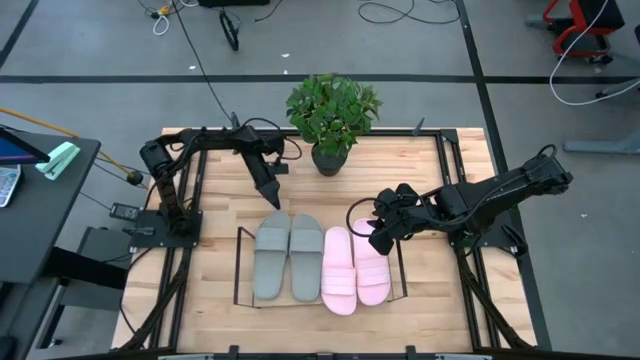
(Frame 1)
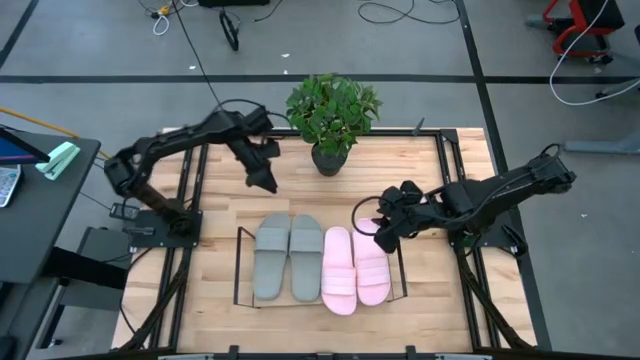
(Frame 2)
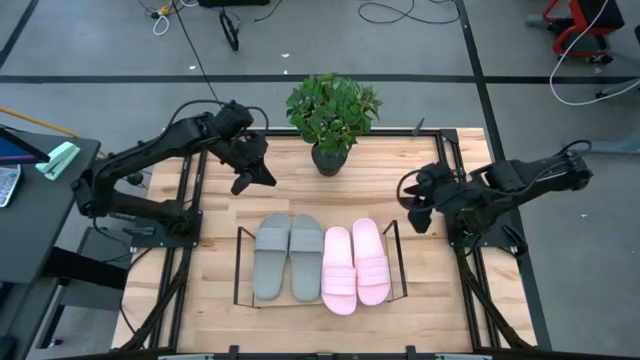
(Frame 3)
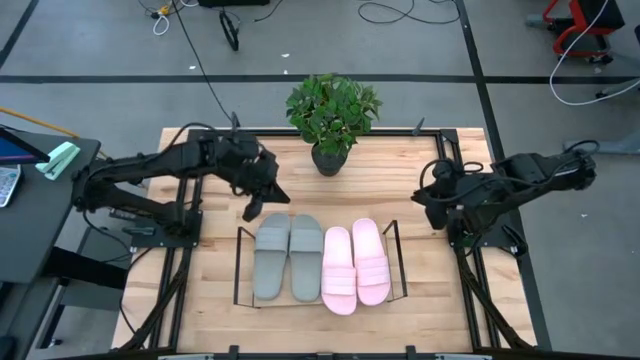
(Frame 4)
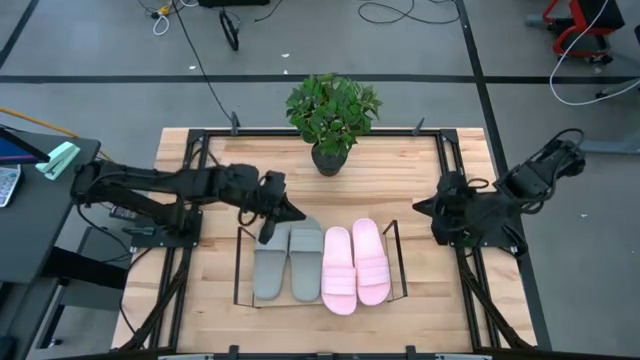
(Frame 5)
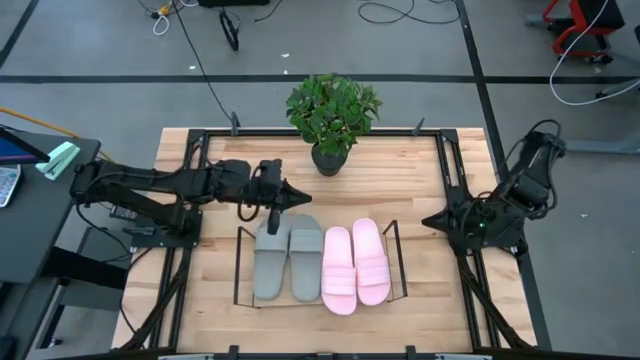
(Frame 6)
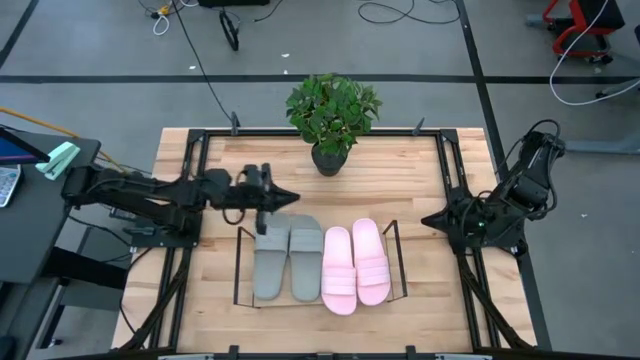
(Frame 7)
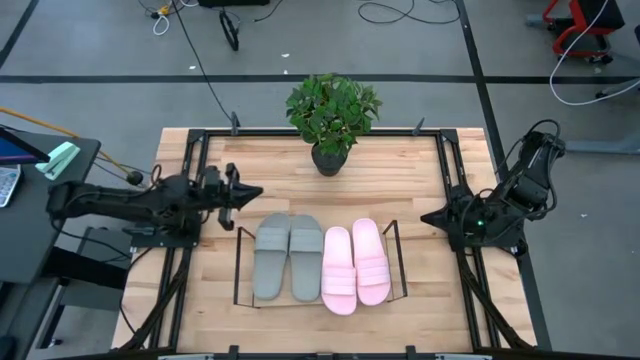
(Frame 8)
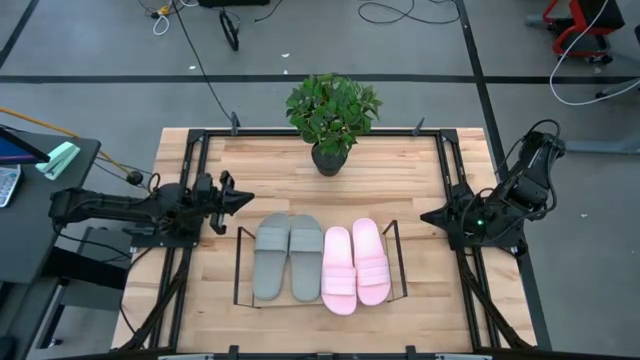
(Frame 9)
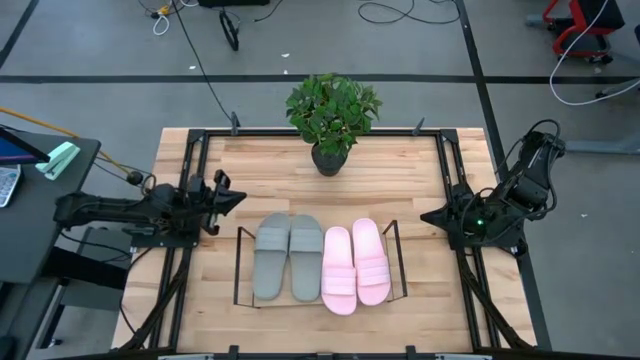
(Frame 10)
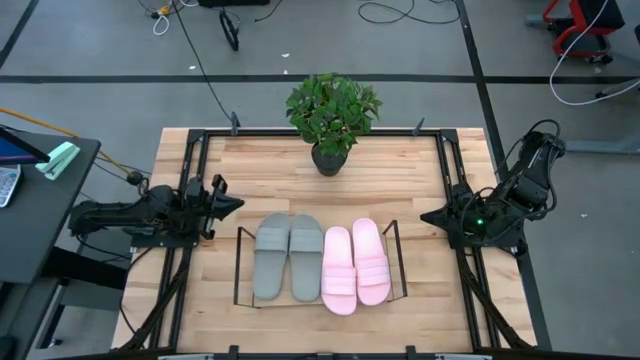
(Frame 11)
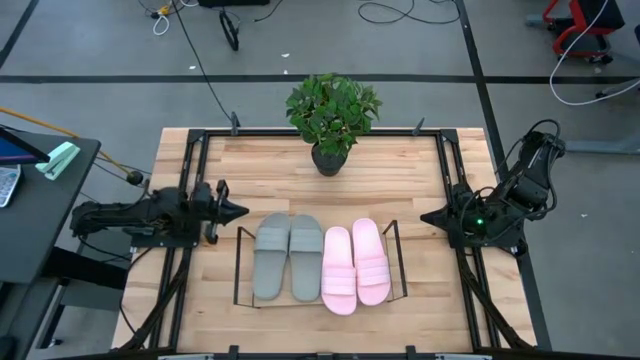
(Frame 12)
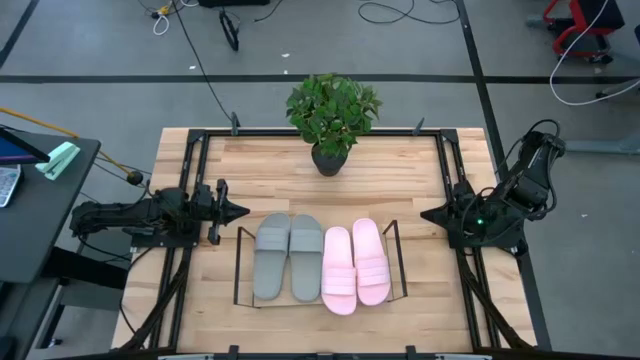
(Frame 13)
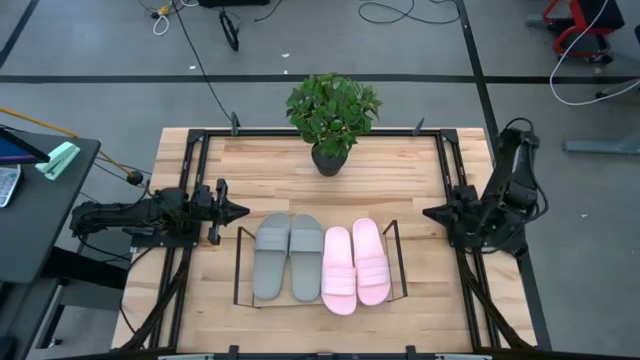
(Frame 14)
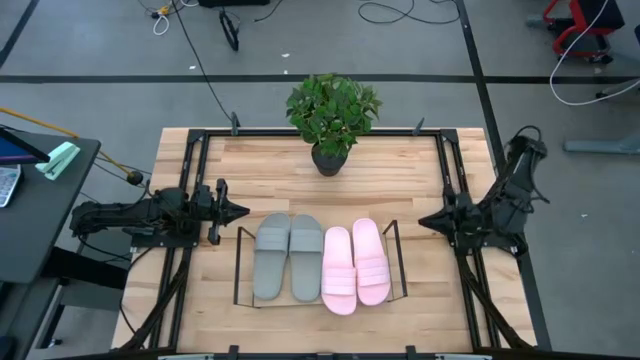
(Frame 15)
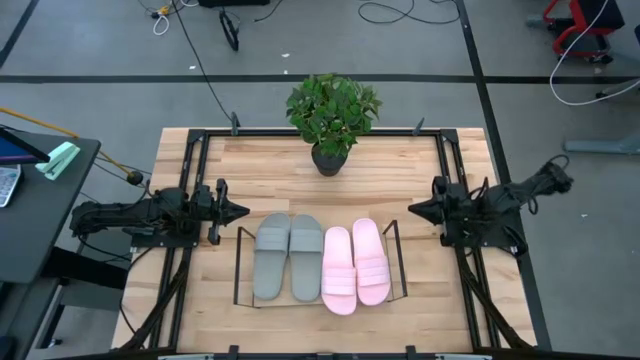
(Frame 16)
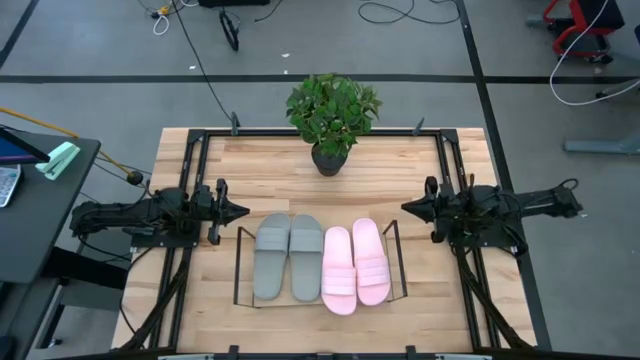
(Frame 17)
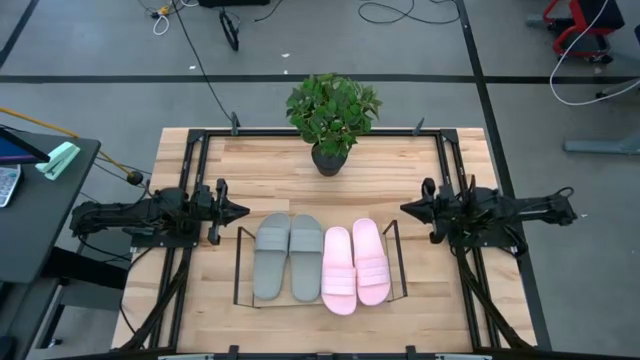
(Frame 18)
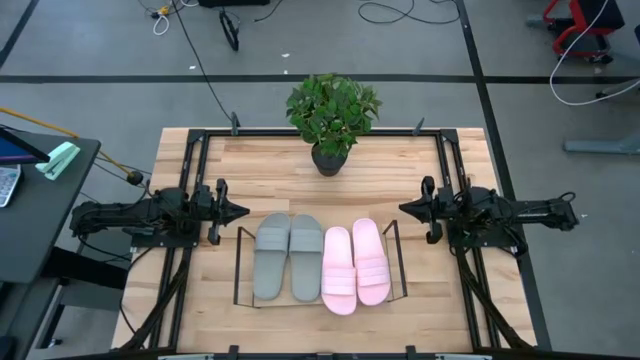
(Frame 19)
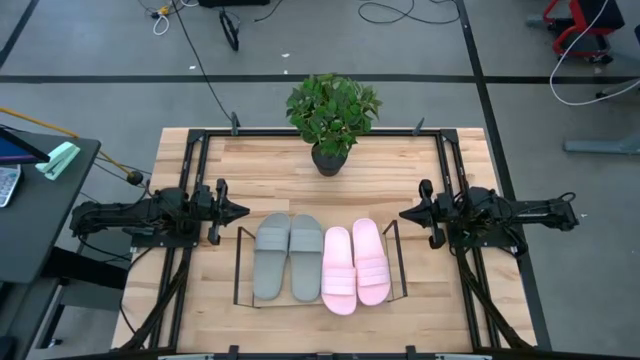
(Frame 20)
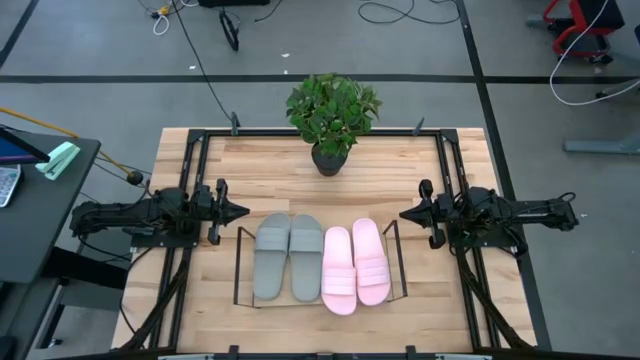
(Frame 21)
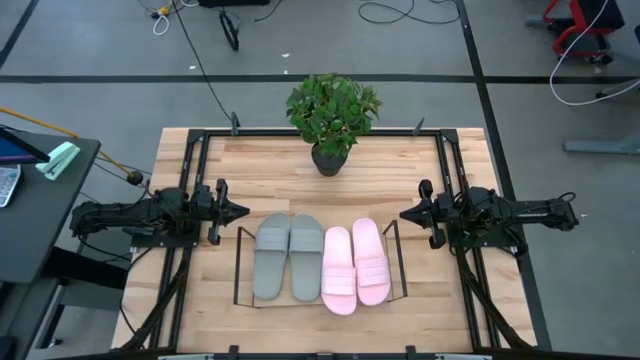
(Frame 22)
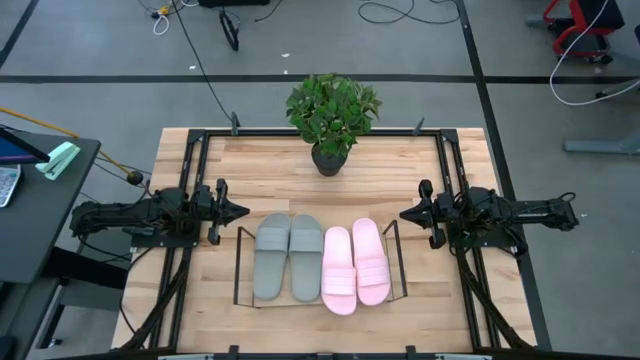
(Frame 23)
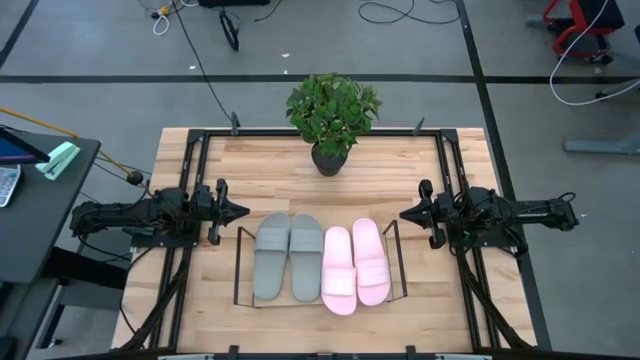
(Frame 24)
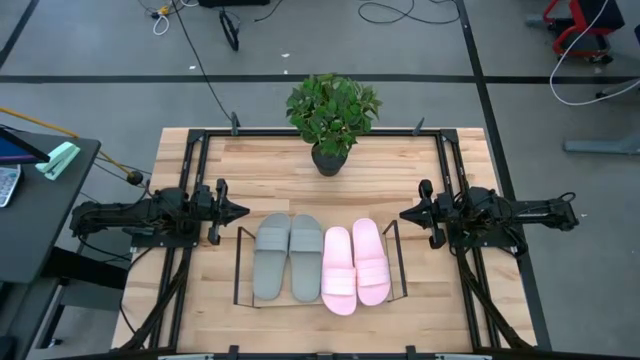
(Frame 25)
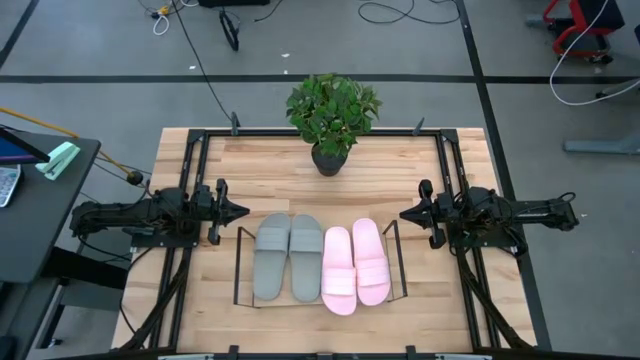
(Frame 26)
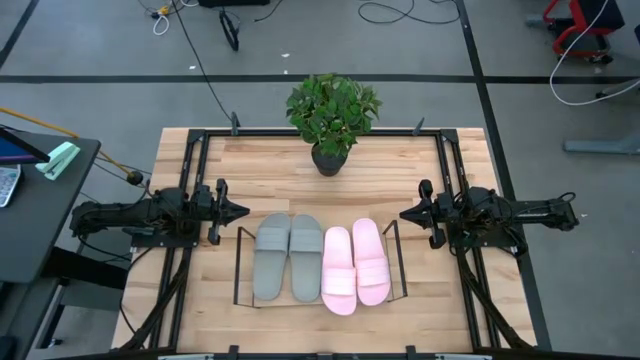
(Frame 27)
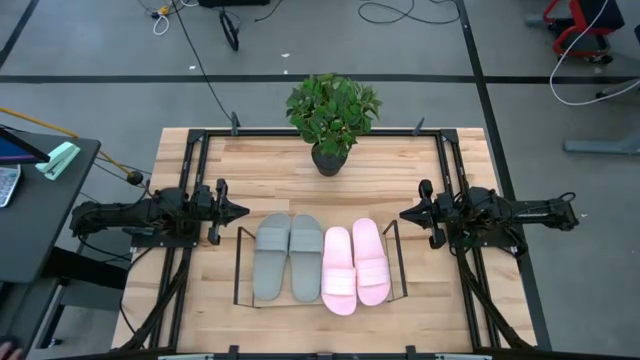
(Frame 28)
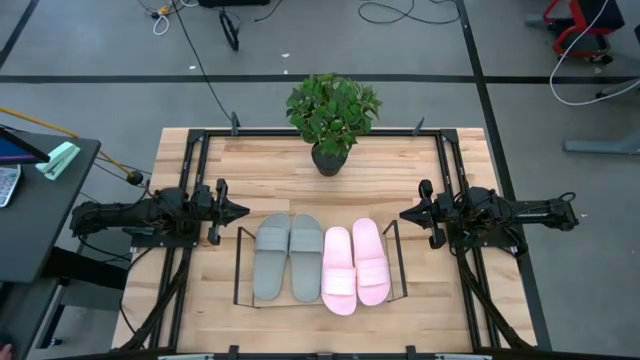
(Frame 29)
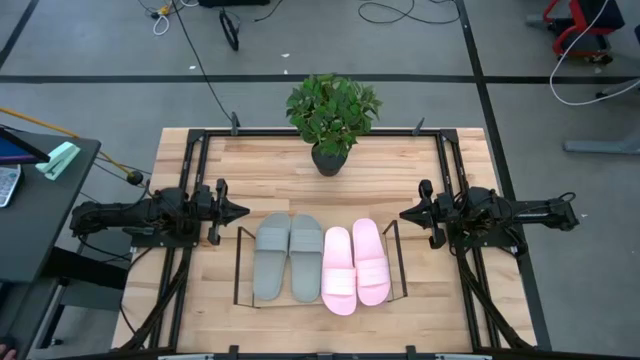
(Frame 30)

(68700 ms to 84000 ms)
Task: Pick and place slides into the shelf
Return to Home Position

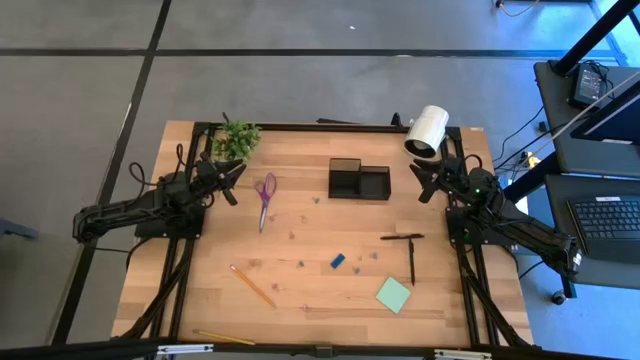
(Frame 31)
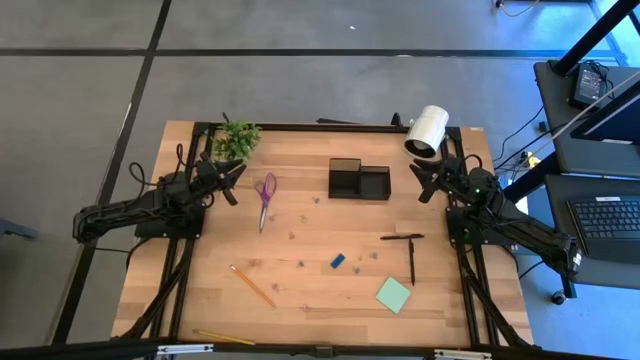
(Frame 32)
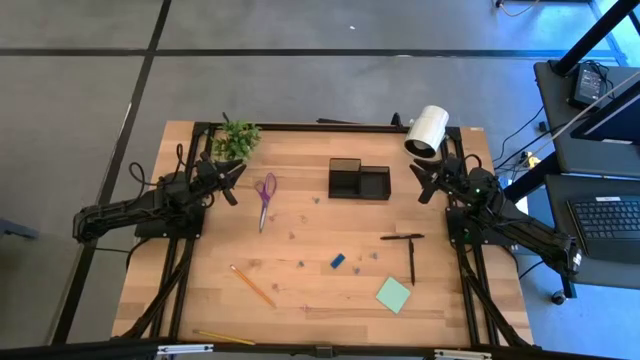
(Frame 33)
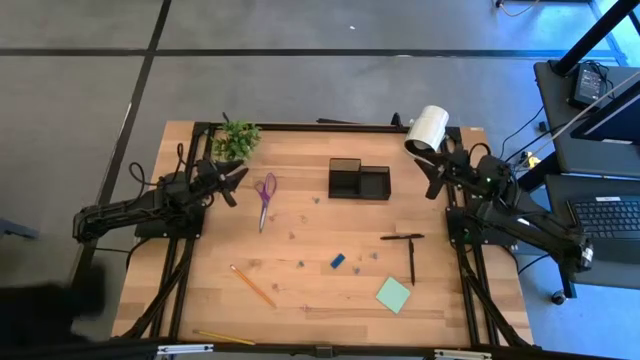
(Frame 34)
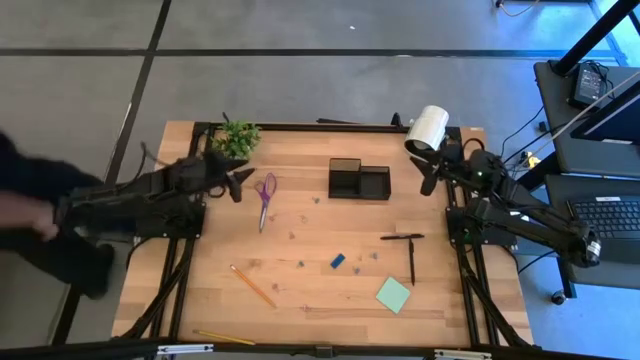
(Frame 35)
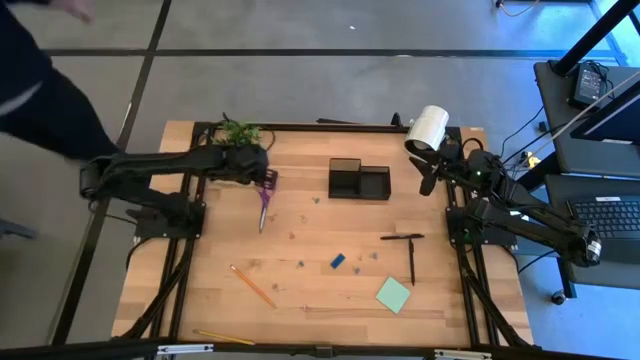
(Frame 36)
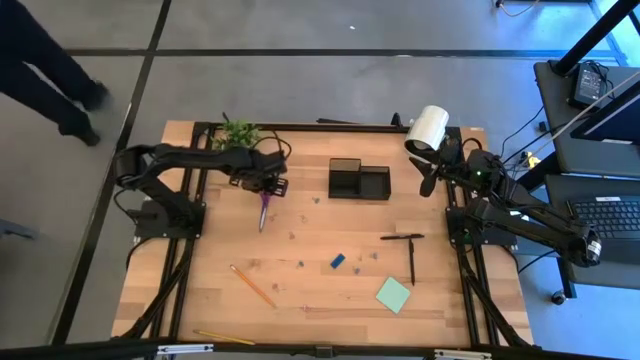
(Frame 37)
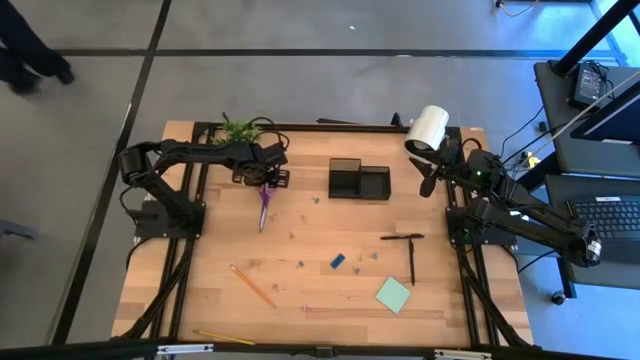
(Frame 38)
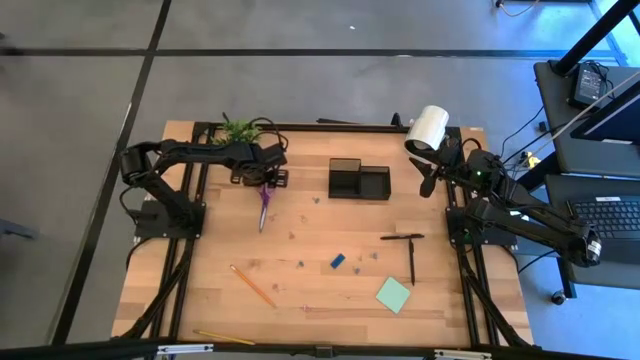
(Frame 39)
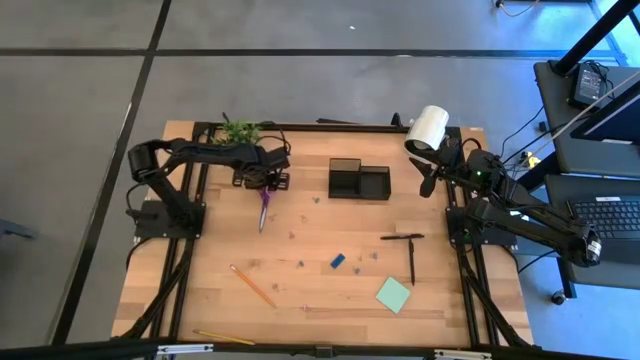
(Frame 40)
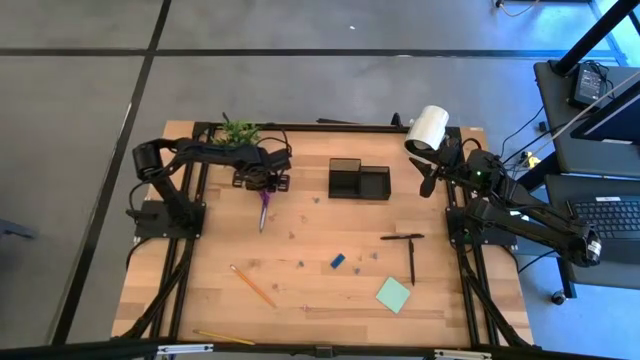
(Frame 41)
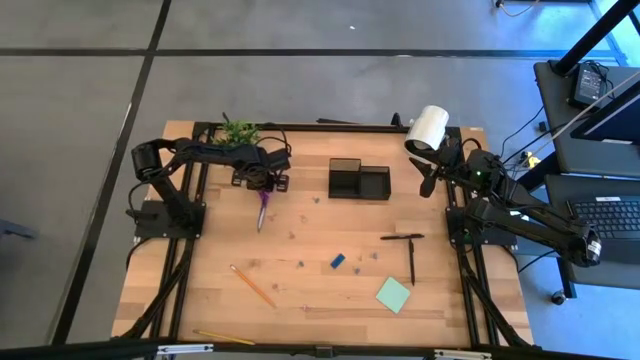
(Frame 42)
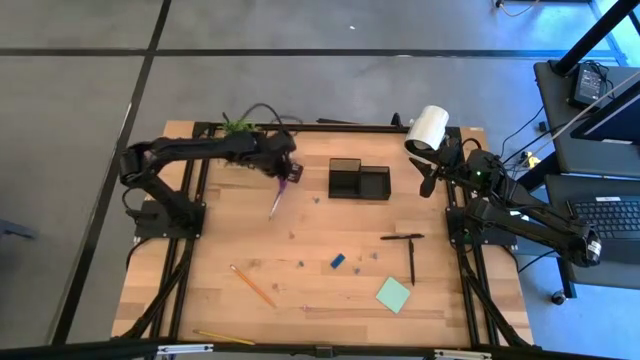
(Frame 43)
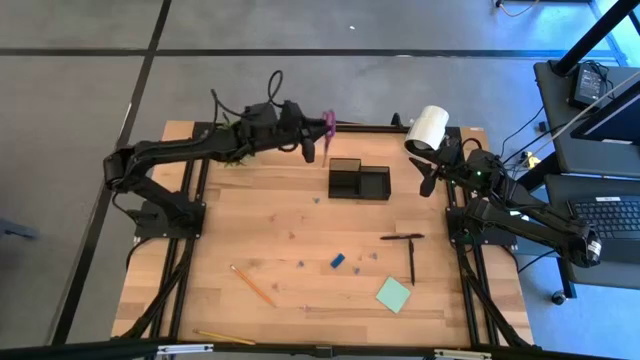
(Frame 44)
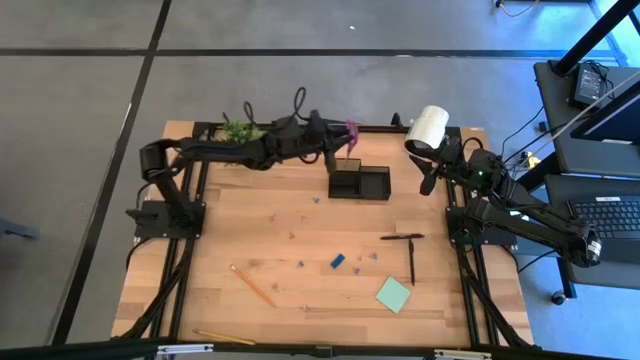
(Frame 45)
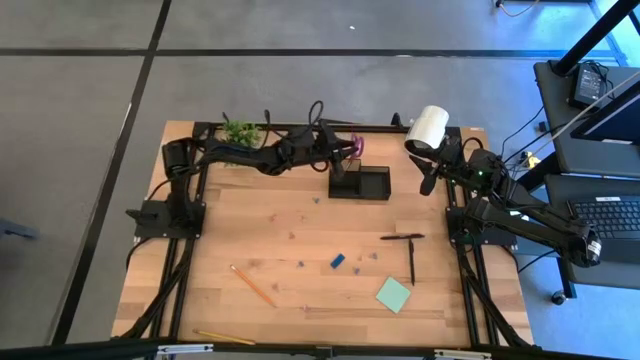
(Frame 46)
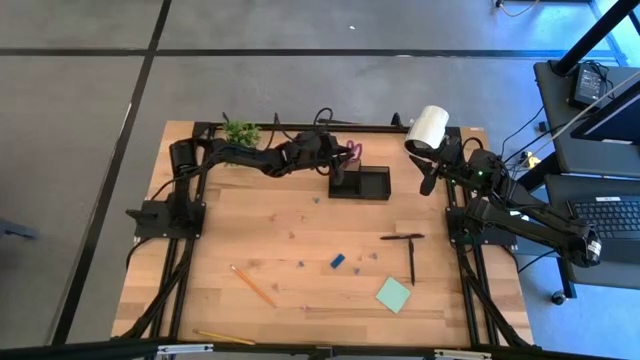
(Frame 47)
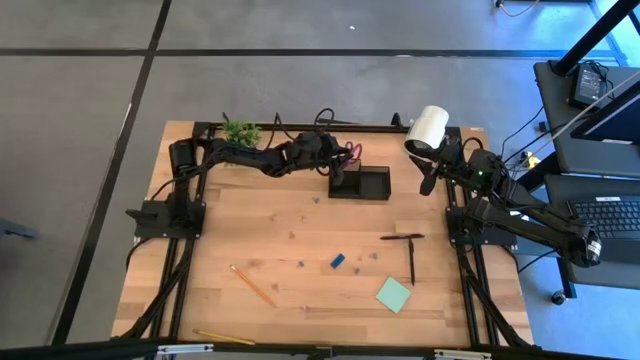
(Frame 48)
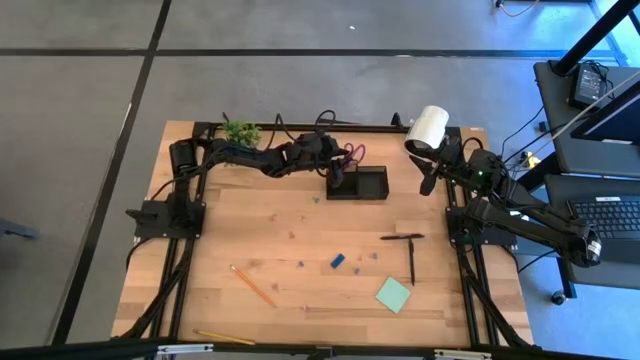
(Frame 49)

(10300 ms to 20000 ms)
Task: Pick and place office supplies into organizer
Put the purple scissors into the black desk organizer
